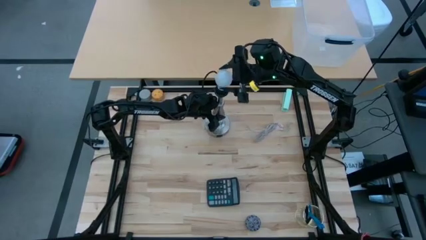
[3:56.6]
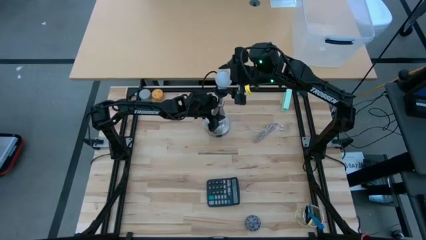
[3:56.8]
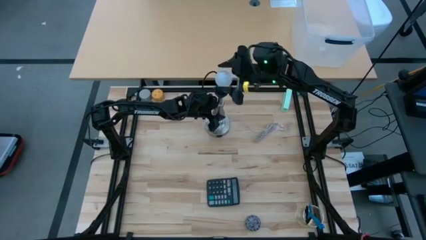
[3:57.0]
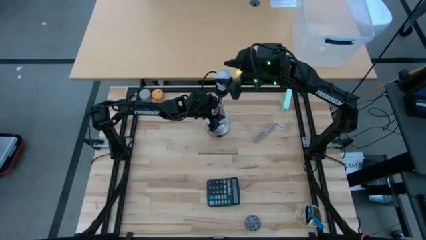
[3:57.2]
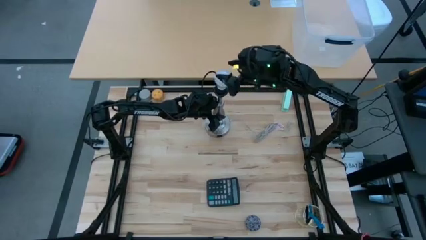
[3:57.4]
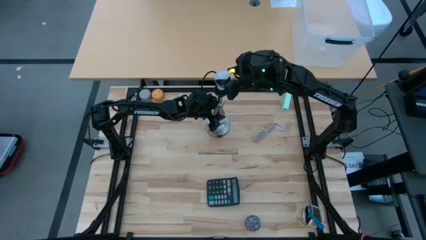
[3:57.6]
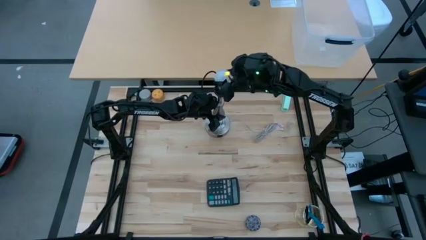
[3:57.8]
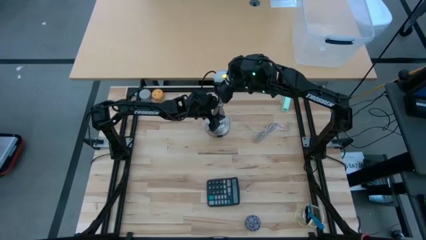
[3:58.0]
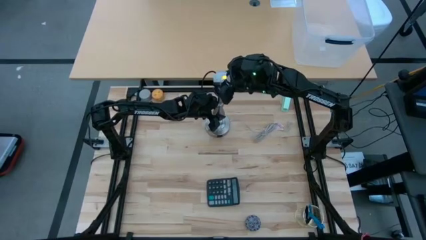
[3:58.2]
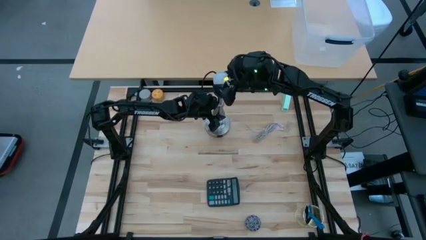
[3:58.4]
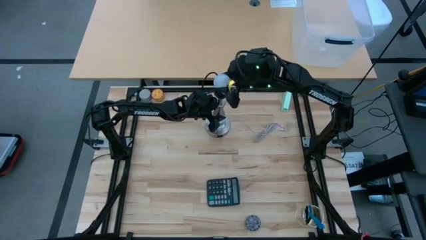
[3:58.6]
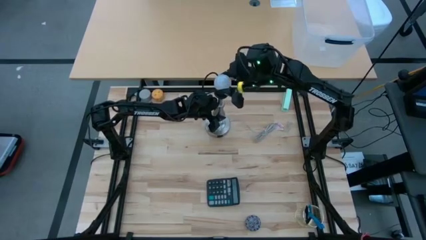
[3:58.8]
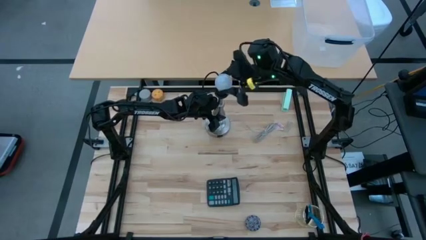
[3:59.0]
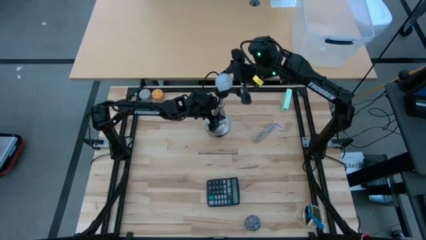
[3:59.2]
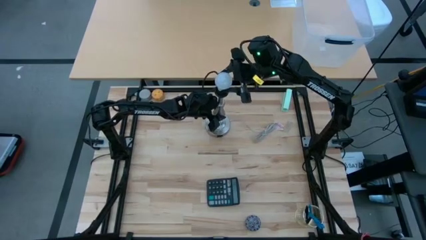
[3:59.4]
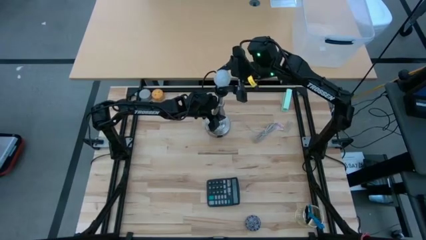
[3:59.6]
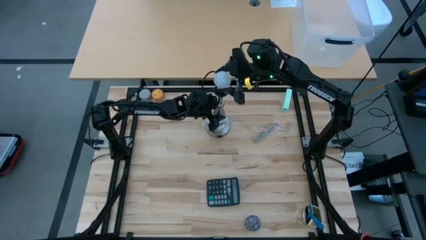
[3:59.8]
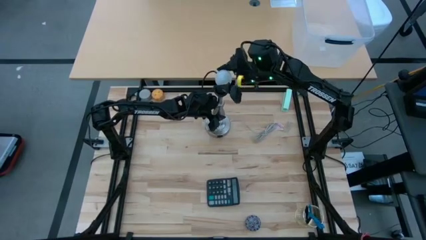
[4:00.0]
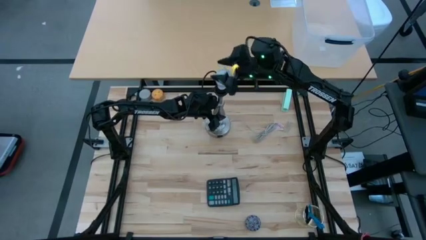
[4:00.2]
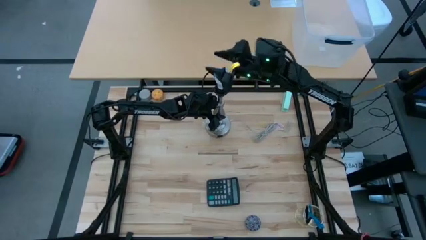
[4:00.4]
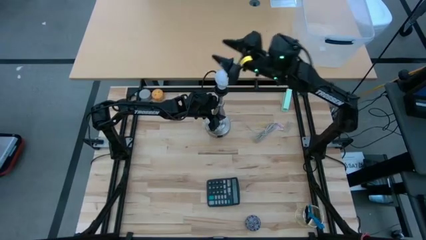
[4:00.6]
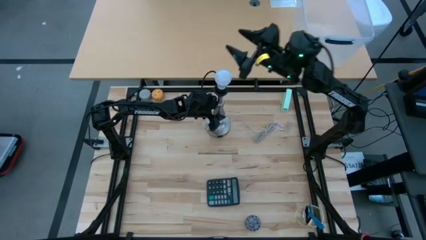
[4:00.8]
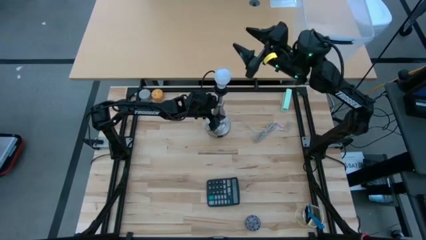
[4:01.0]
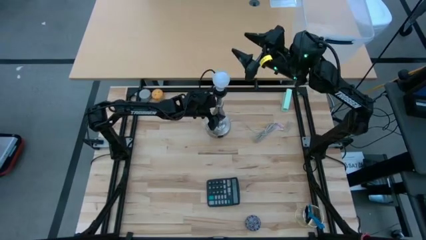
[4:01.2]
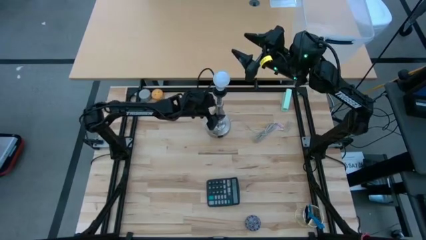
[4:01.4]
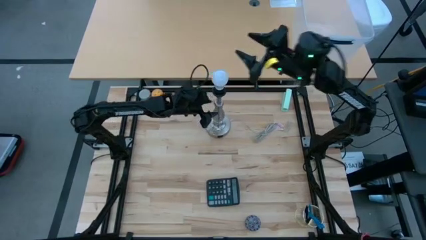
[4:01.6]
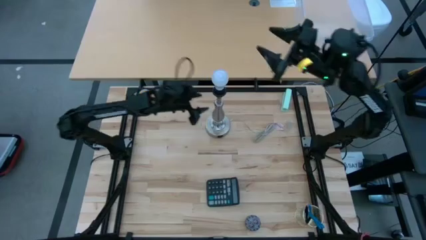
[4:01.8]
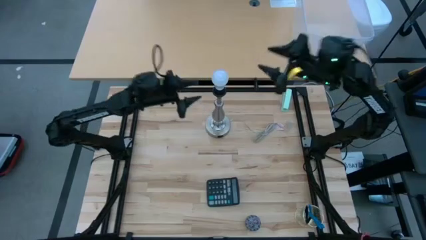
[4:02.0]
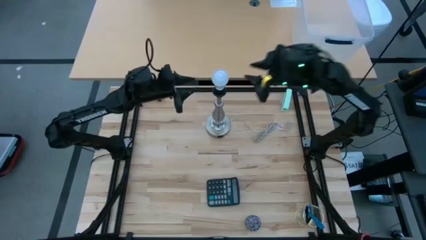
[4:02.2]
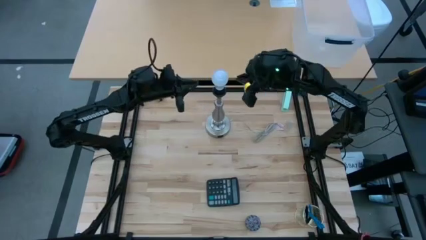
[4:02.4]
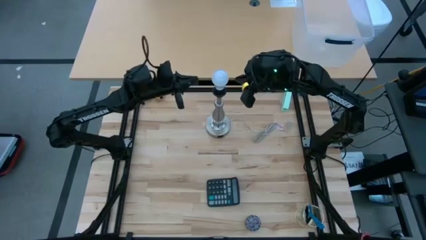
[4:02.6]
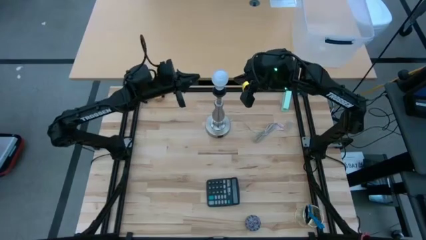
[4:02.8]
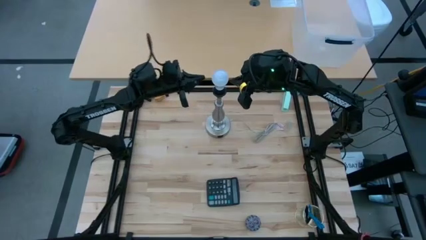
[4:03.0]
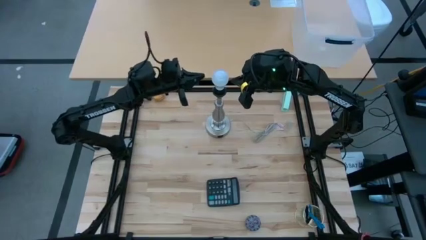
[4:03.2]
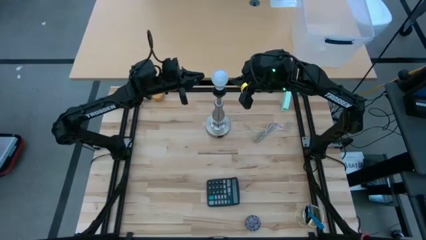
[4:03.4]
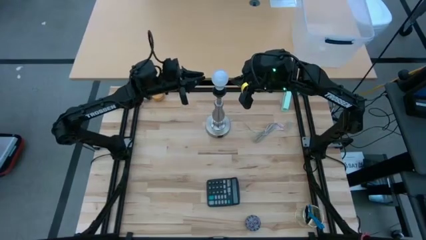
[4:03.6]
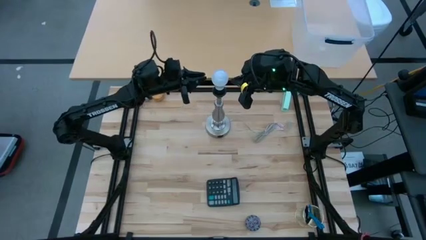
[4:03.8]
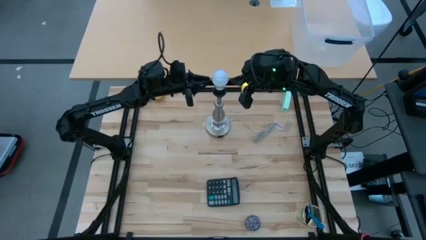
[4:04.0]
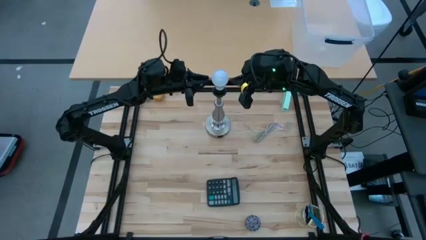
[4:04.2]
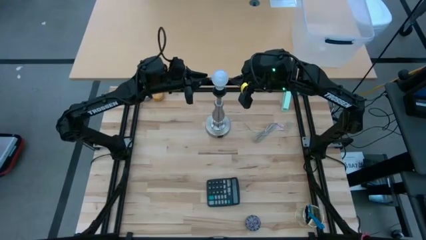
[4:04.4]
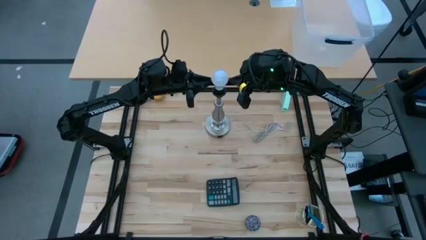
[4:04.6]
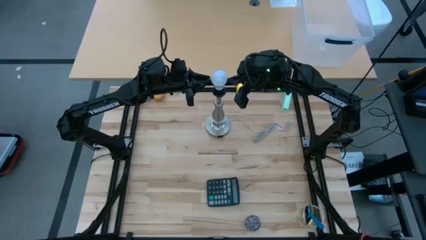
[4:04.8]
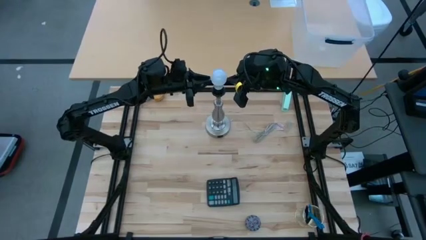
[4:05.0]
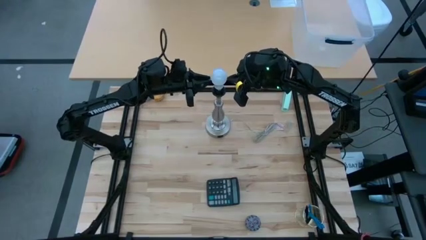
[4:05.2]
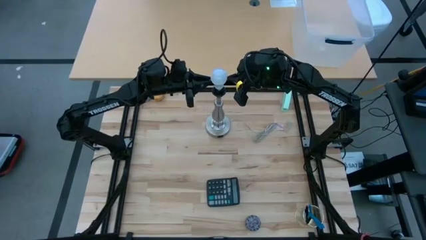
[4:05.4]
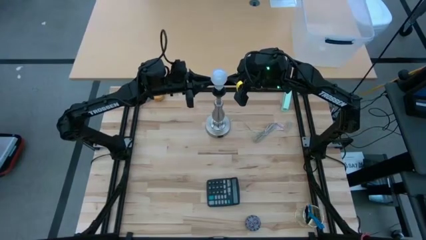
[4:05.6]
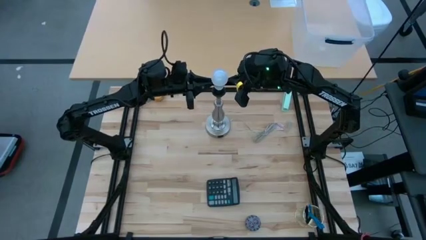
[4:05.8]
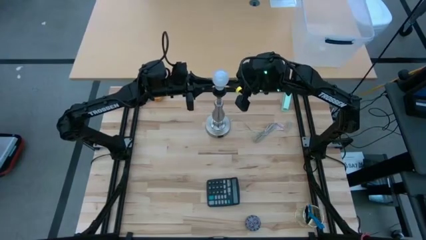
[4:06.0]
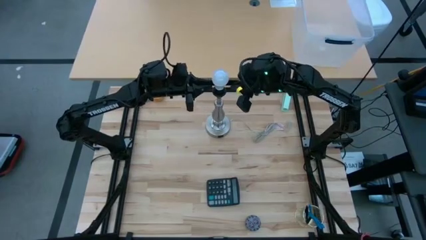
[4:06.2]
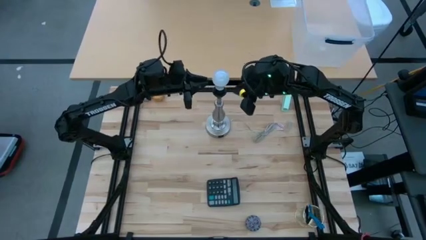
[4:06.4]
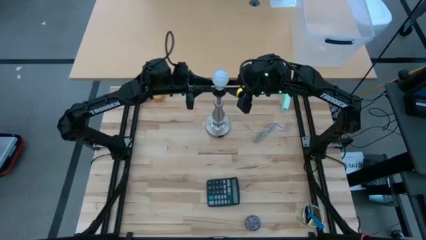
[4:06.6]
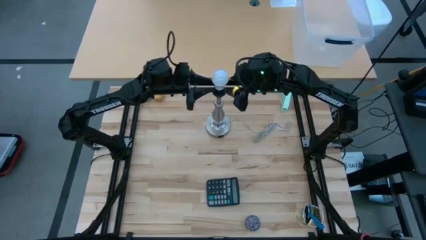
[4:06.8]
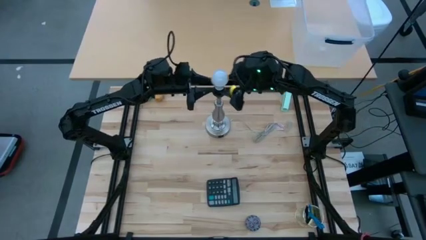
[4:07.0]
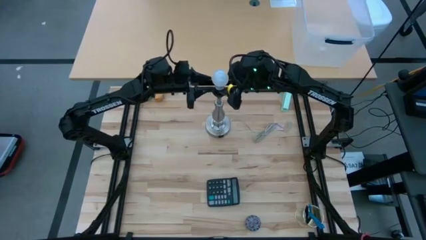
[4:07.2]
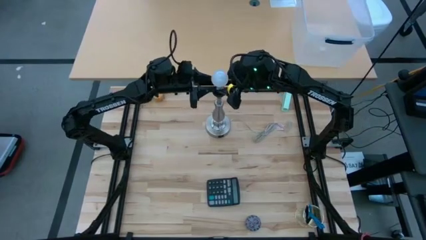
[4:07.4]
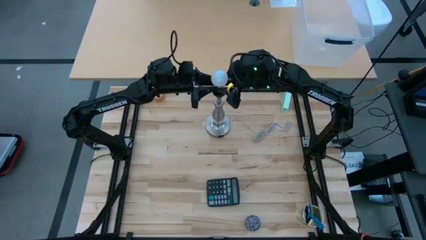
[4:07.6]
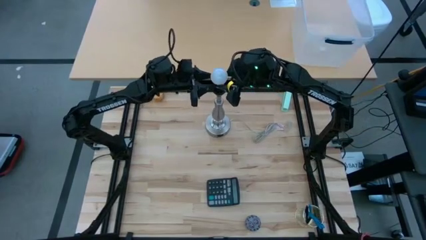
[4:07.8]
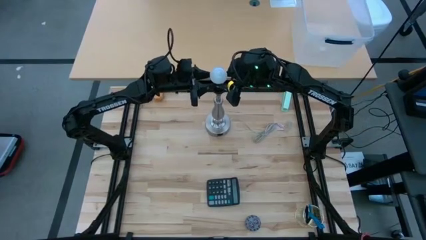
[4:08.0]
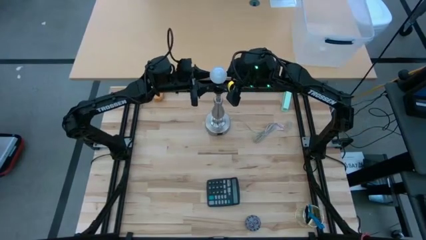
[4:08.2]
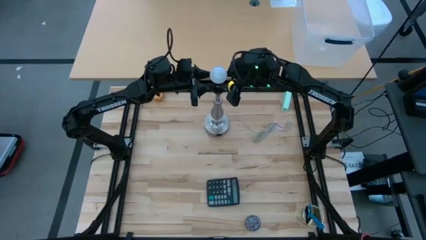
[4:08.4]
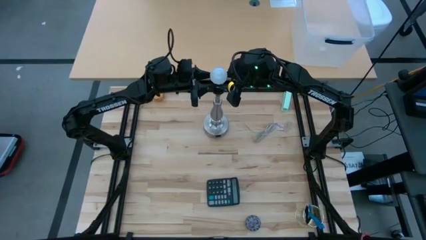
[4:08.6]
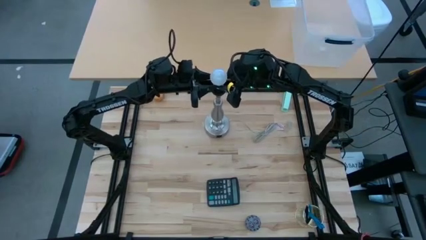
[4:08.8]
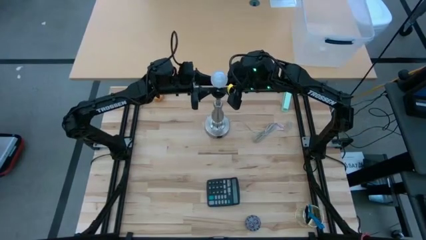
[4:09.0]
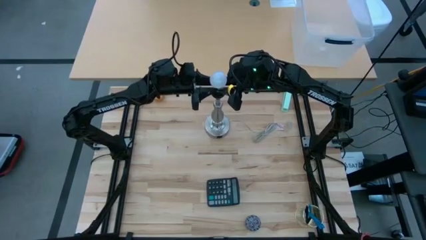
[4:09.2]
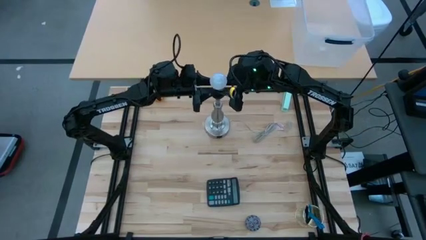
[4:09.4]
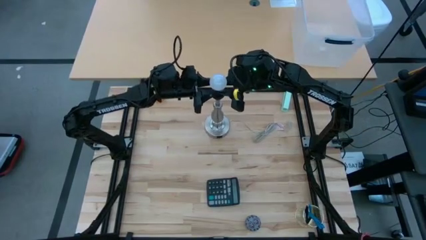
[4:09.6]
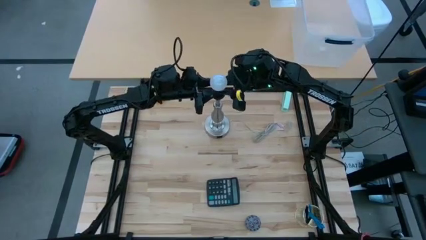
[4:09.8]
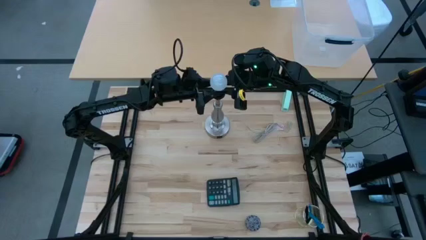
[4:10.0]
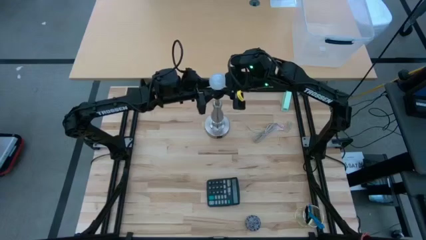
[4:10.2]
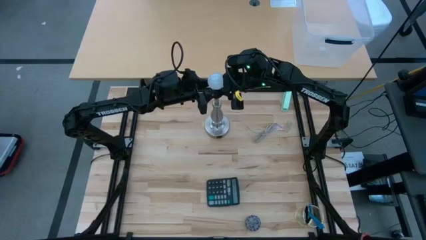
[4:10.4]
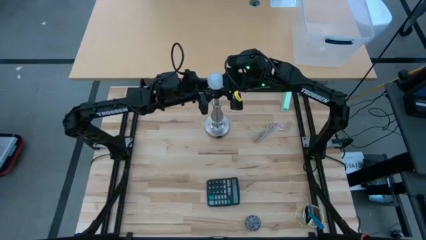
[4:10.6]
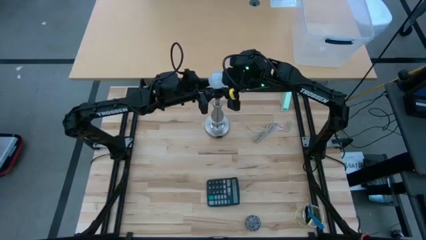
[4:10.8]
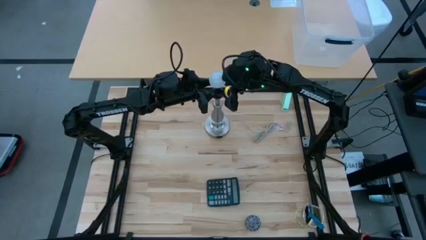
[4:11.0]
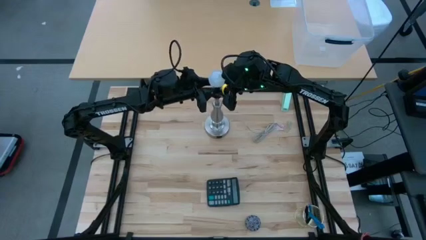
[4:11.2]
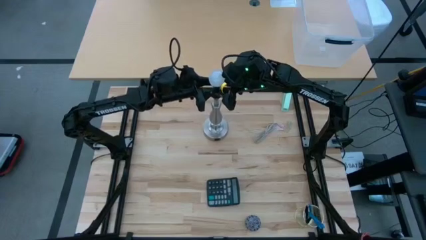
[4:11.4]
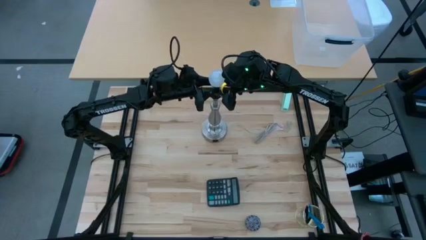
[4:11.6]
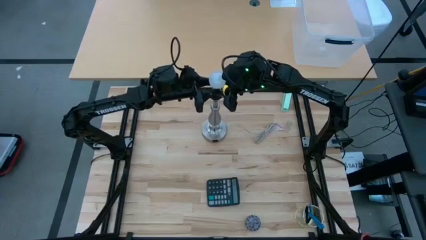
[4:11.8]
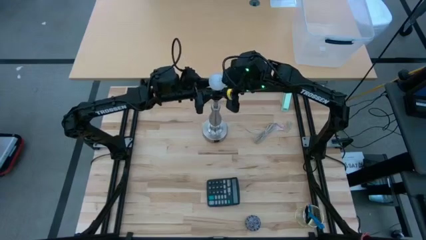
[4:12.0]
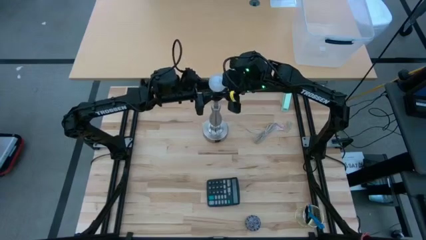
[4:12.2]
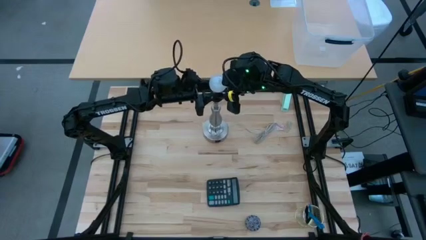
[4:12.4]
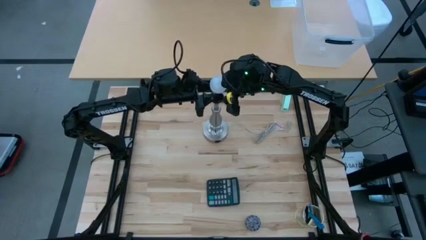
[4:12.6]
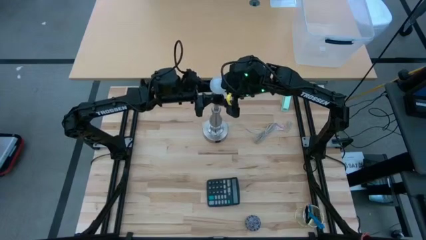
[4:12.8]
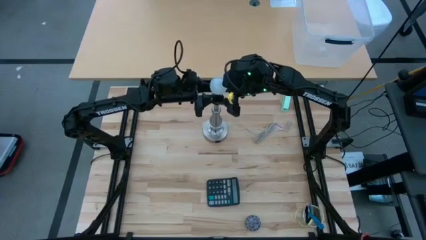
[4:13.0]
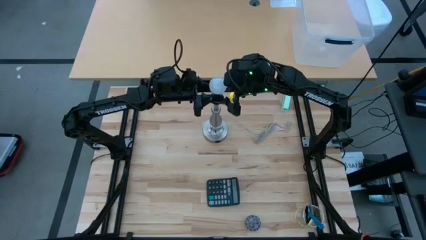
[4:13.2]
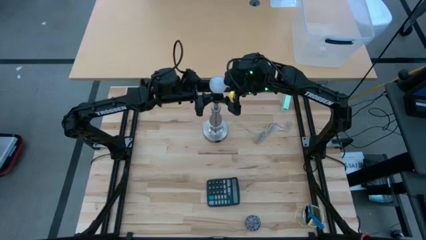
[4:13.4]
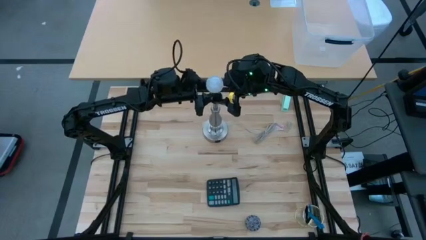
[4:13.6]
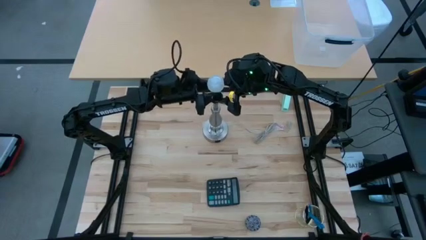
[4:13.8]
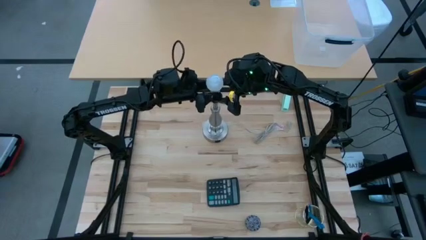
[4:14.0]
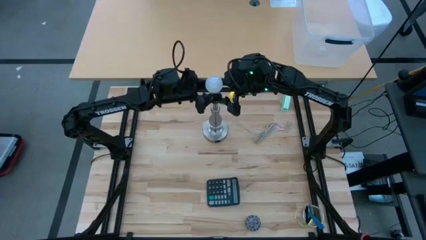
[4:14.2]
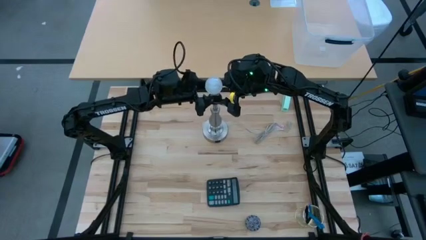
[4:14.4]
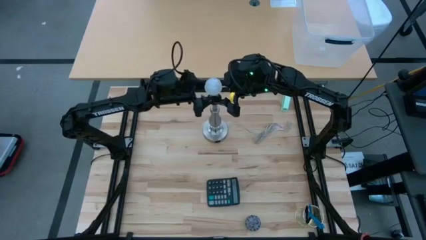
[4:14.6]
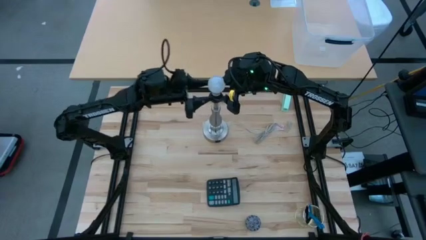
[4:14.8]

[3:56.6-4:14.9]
Task: Screw lightbulb
Remove the light bulb from the lamp
